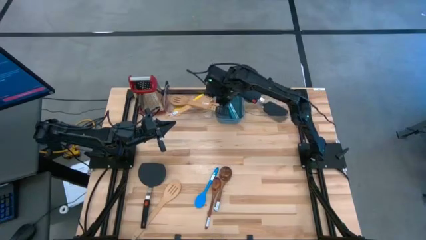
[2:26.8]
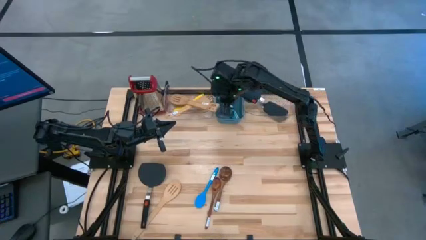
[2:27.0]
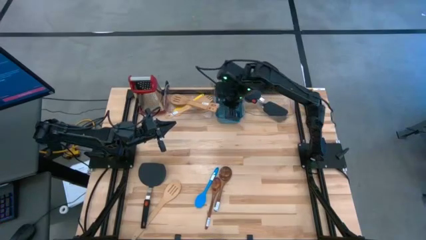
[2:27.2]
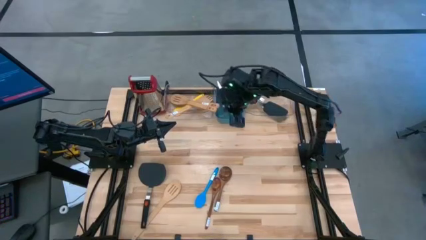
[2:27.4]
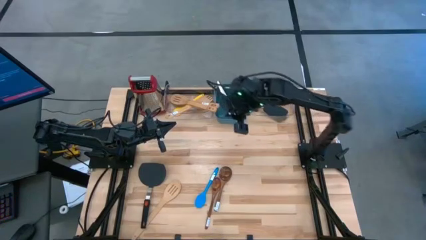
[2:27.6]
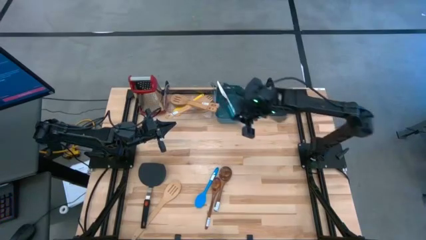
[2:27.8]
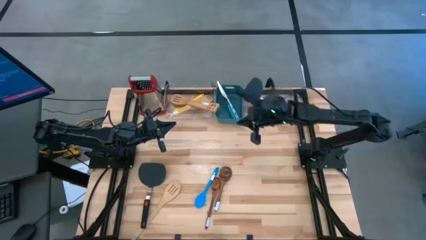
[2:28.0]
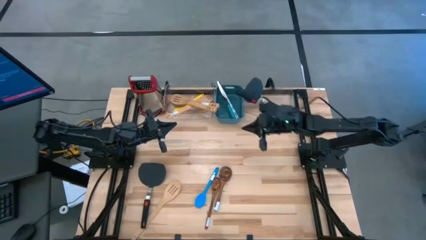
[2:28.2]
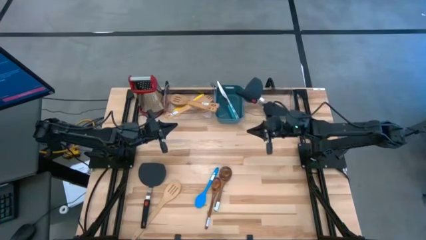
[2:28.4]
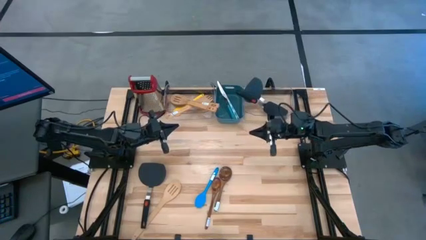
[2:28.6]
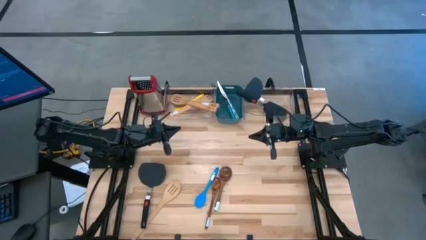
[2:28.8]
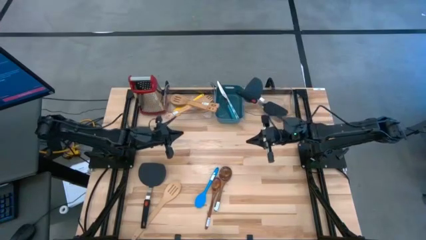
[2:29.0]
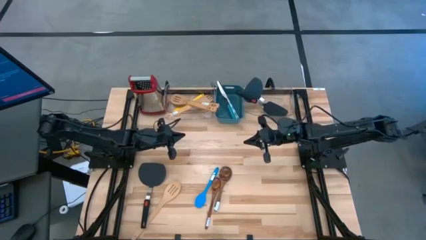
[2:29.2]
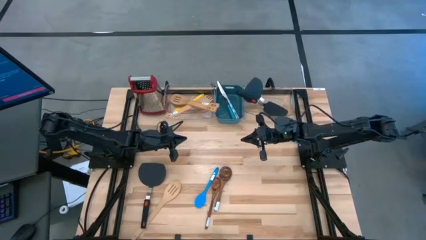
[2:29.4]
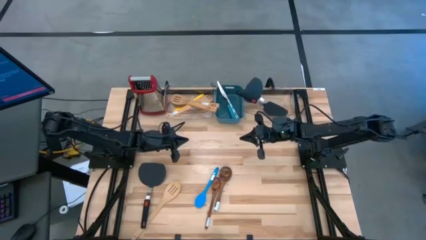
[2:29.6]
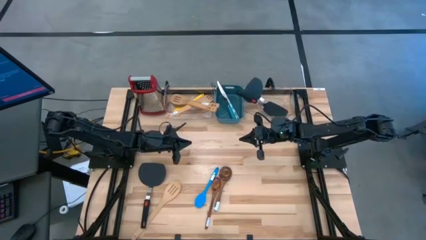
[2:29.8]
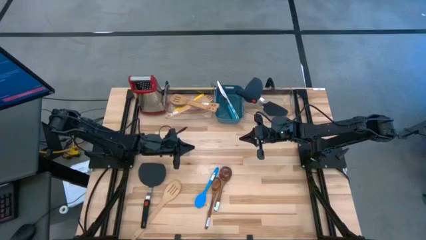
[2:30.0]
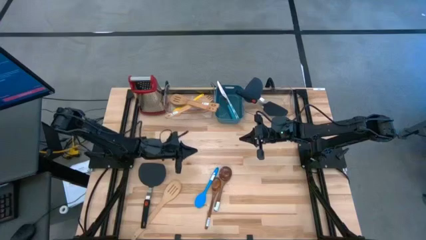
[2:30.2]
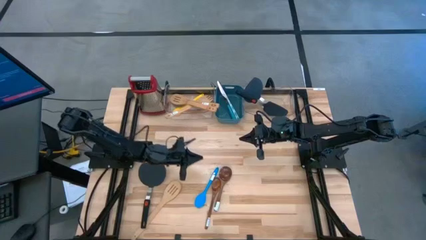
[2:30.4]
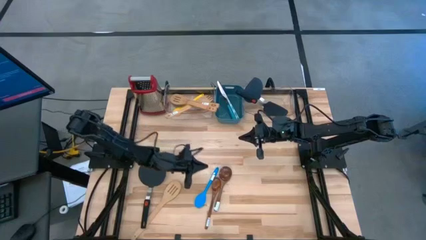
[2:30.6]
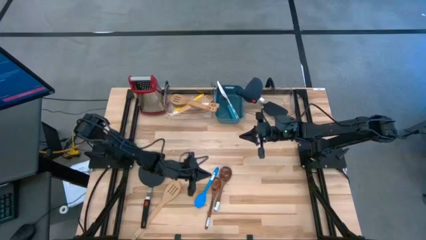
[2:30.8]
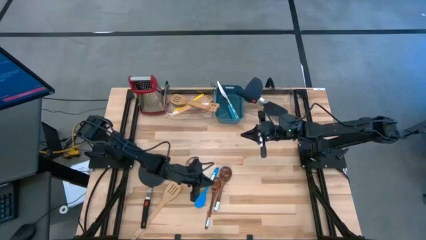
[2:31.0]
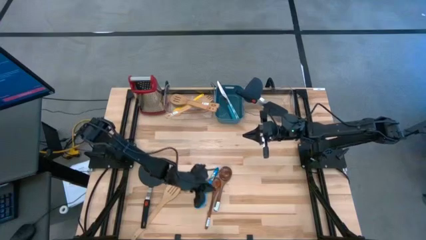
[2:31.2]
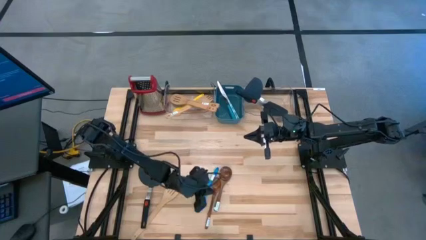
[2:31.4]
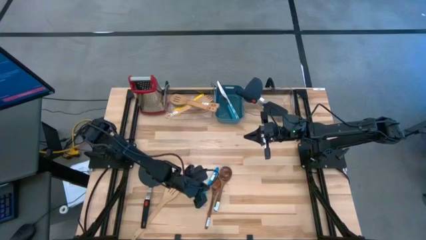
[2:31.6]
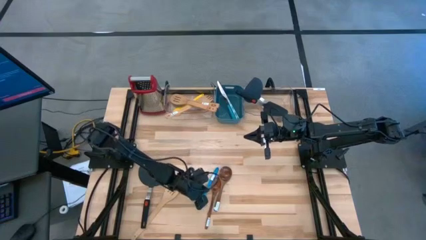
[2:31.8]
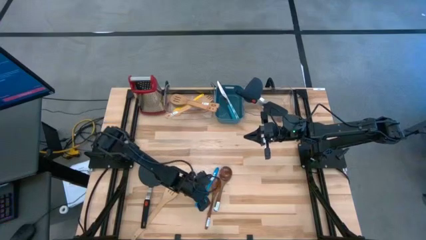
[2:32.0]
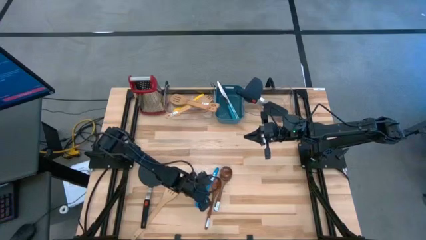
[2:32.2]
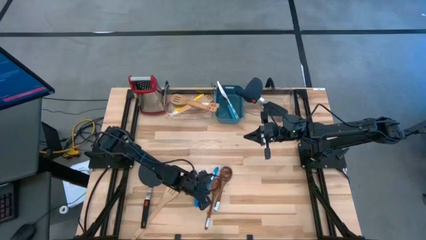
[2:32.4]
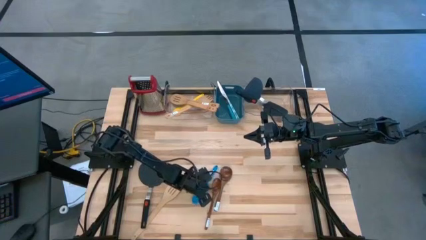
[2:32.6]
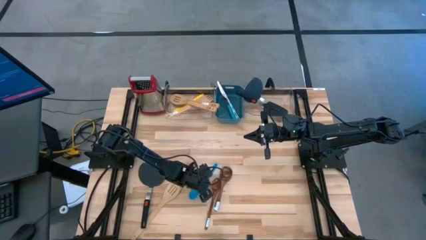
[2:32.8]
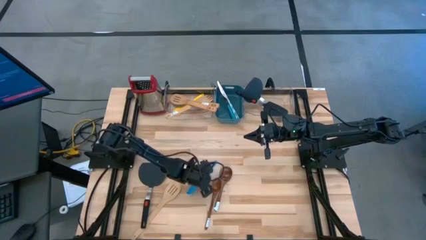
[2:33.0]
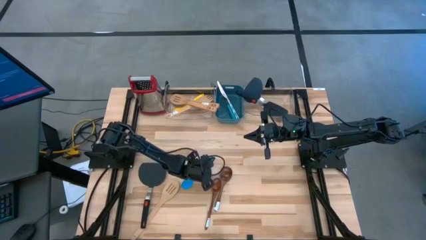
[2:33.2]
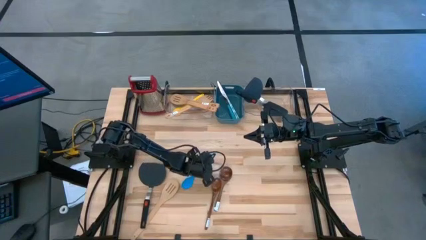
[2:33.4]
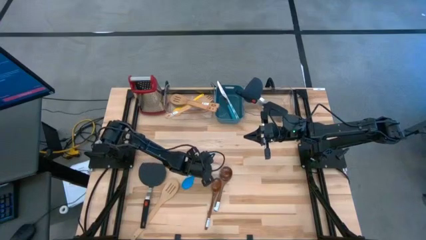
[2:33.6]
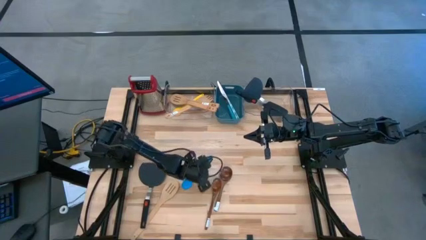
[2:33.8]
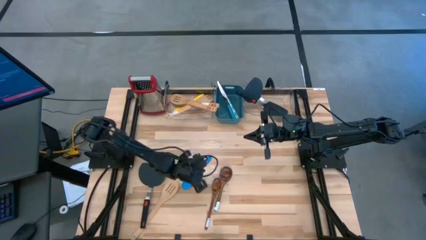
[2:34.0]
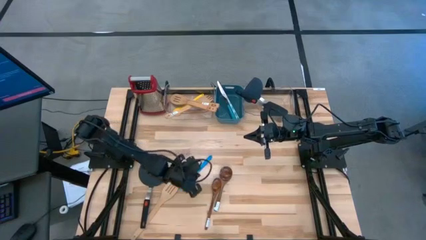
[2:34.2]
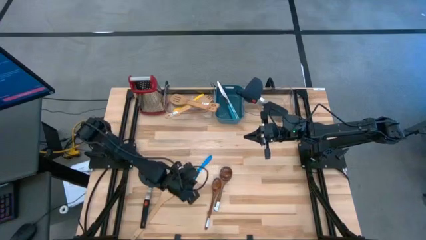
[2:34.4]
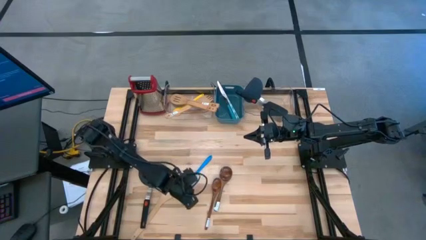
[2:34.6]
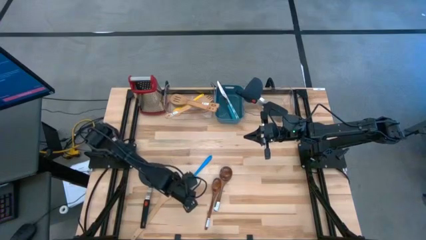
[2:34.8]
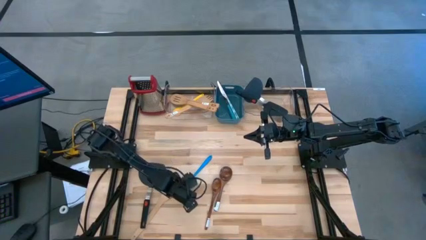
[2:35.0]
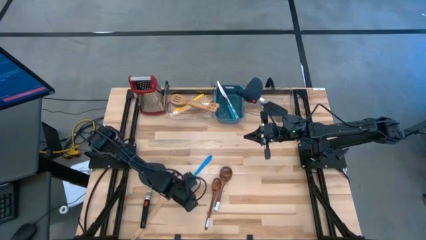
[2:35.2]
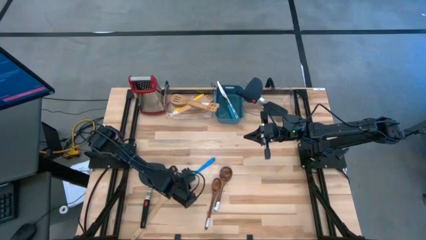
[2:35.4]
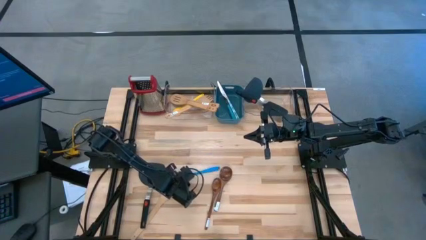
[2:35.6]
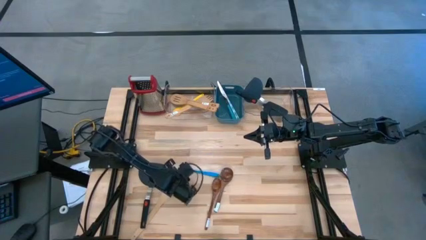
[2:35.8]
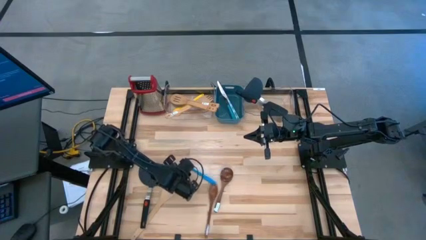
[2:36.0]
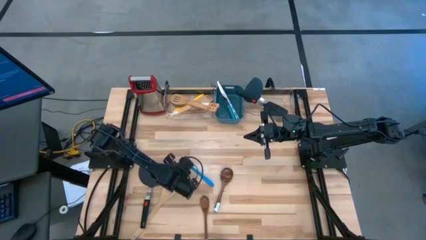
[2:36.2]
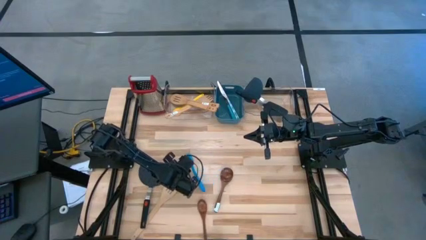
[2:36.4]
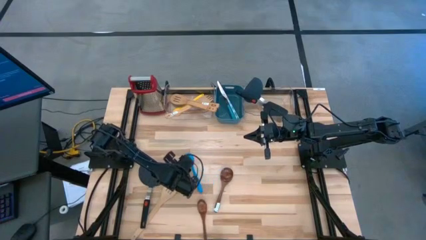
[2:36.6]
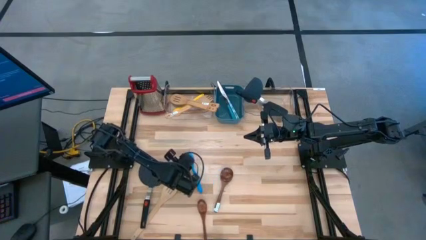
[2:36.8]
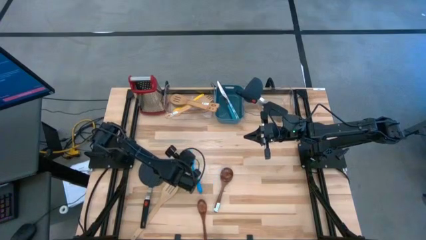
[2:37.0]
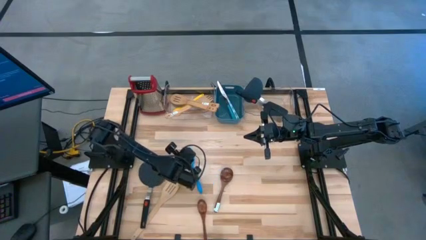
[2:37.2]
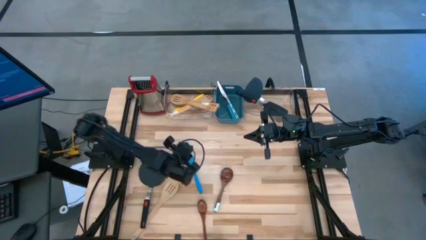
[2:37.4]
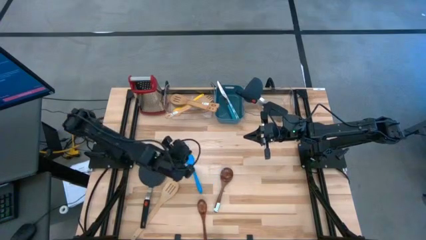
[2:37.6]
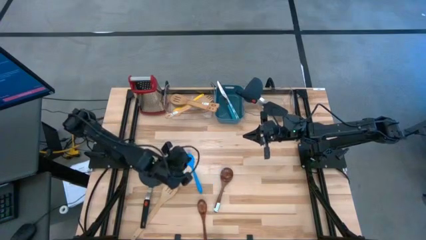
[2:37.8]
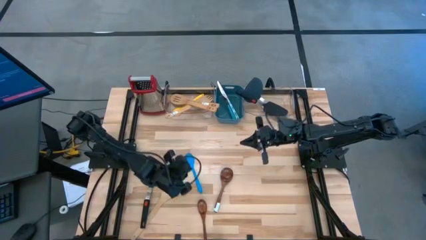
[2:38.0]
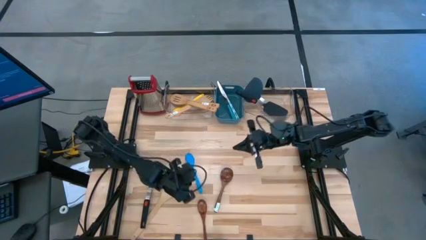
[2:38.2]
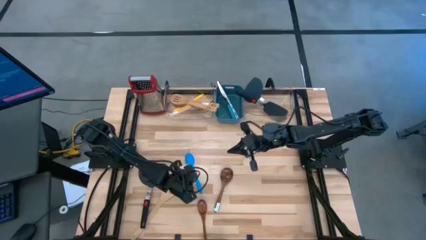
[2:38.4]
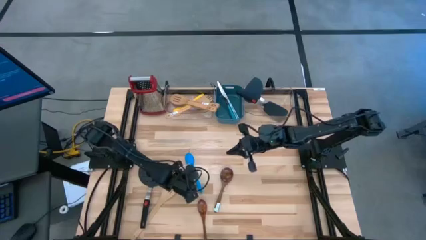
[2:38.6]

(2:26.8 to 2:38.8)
Task: Pick & Place Kitchen Items
Put the blue serving spoon into the left transparent bin

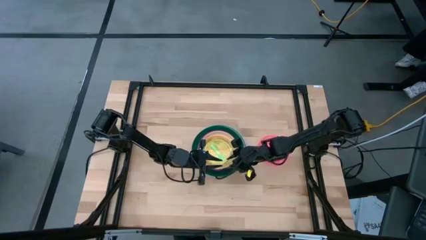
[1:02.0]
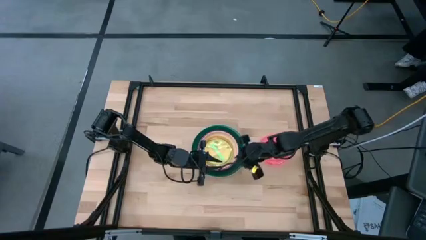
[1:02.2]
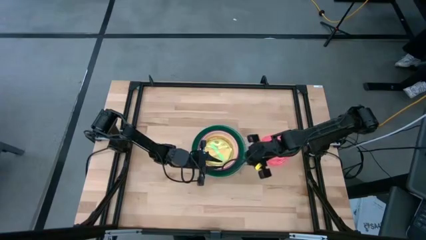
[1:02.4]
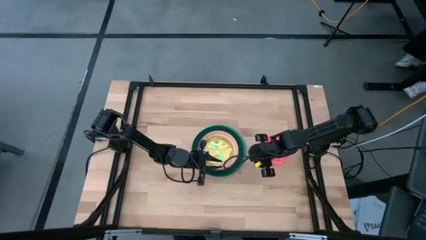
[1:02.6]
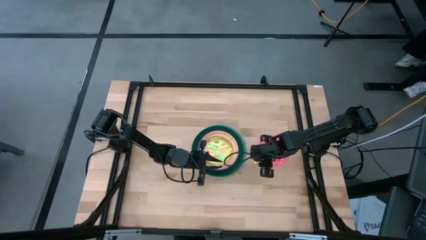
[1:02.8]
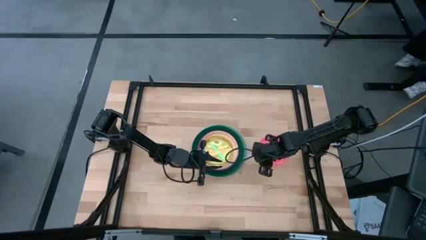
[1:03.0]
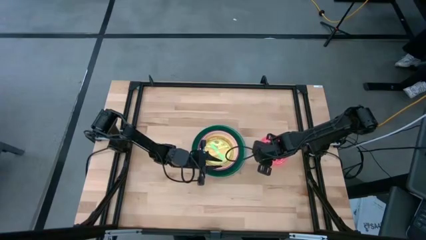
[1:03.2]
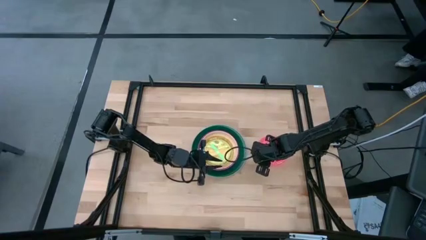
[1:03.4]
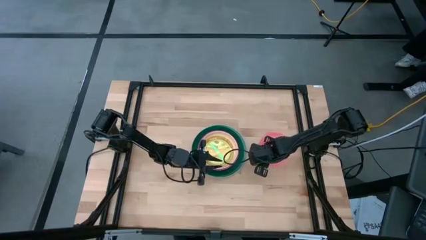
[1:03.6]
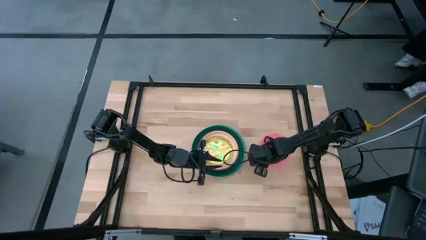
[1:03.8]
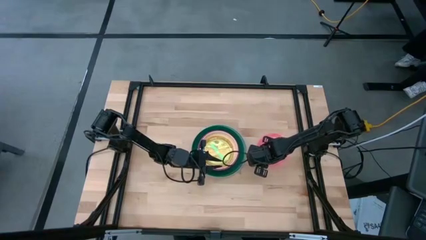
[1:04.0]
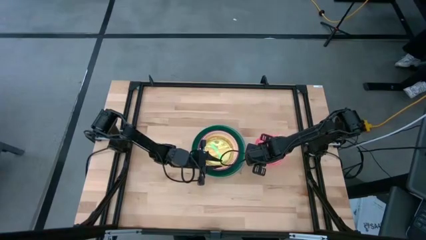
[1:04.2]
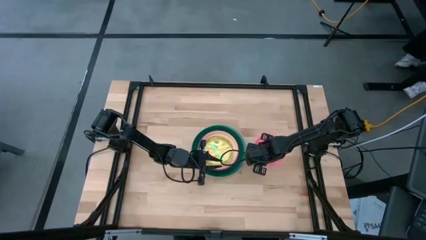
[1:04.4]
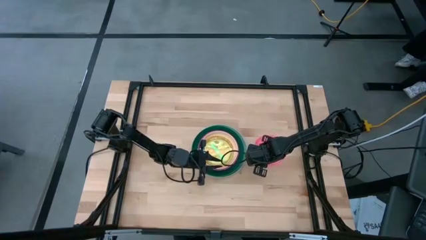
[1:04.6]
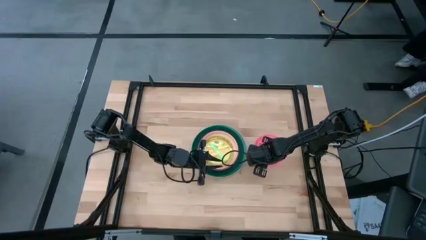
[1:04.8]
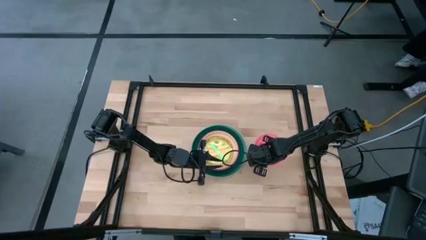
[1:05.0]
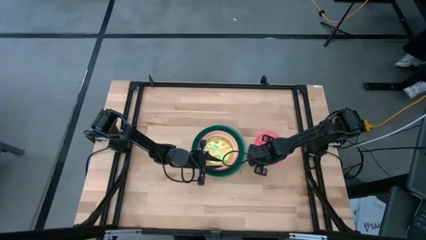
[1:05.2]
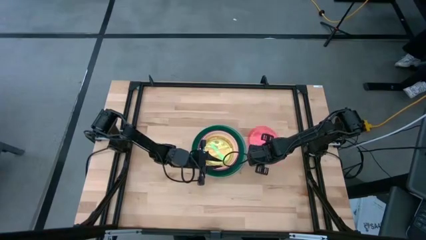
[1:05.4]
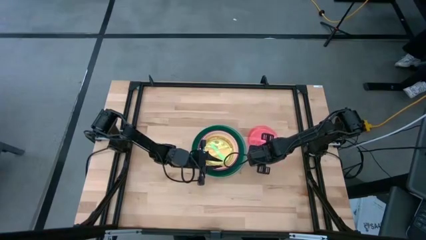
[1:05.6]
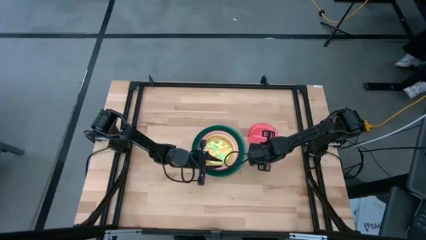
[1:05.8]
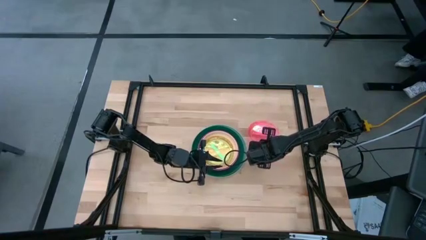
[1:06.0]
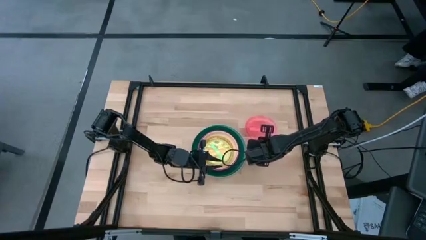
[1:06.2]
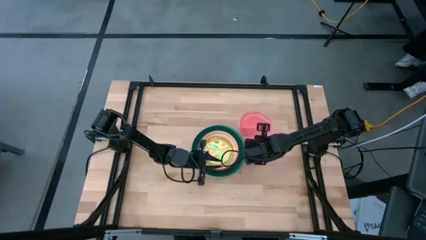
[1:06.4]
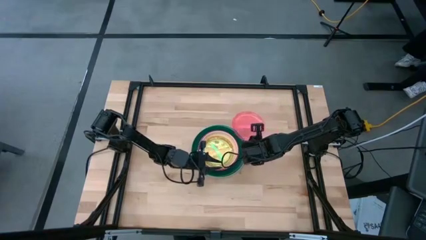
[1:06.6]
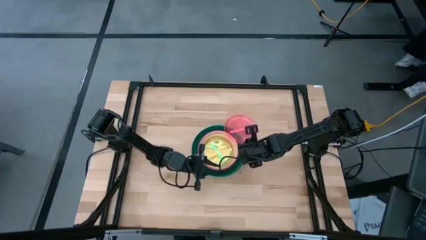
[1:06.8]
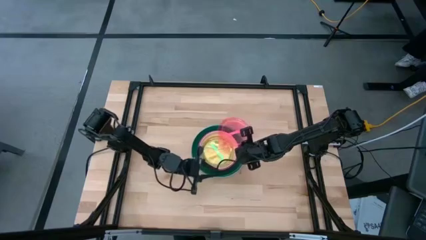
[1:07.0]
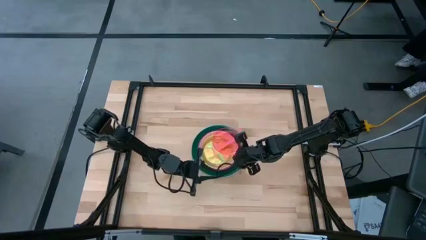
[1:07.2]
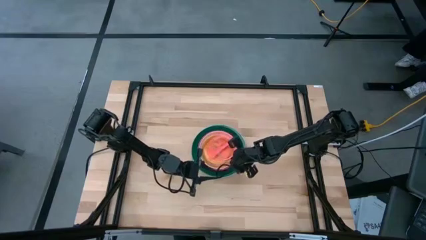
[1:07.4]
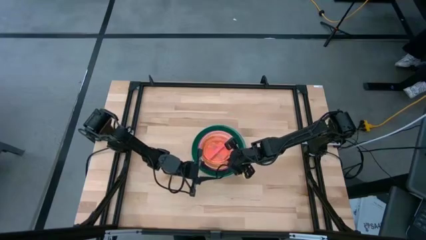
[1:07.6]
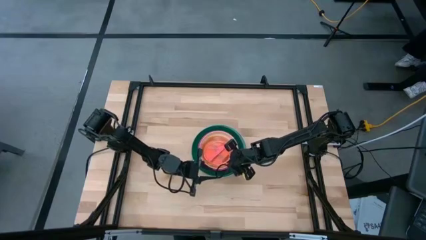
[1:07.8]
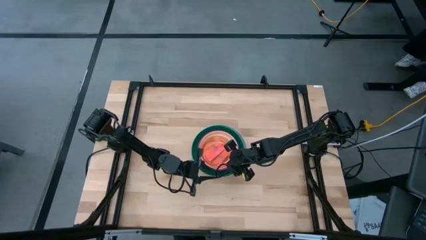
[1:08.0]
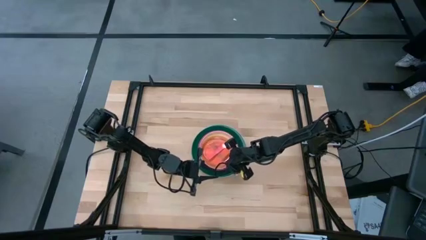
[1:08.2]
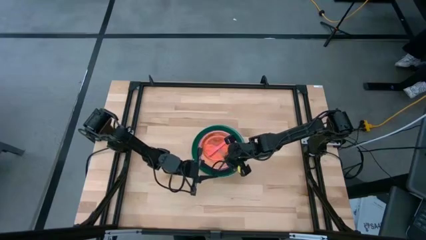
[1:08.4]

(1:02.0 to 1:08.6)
Task: Stack plastic plates
Stack the red plate on top of the light green plate
